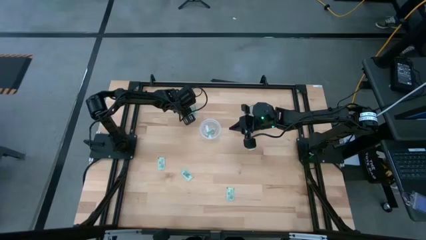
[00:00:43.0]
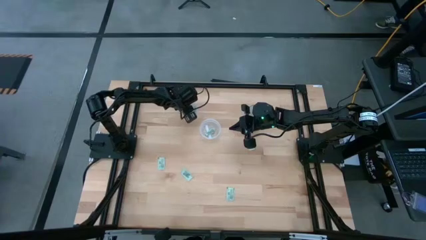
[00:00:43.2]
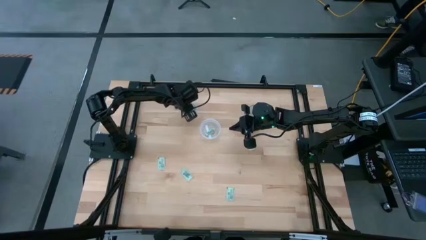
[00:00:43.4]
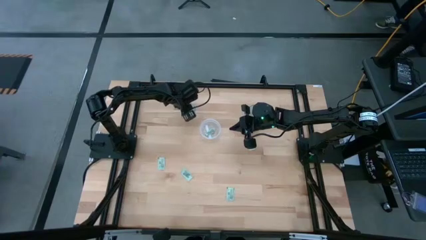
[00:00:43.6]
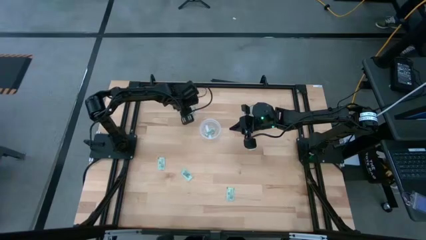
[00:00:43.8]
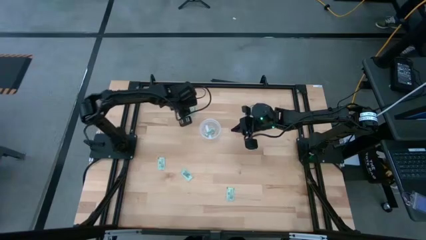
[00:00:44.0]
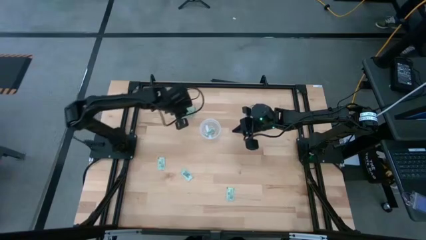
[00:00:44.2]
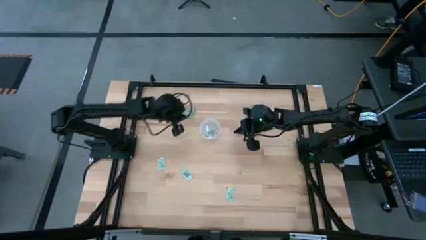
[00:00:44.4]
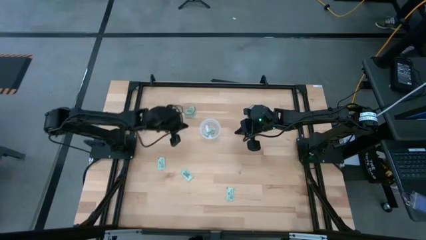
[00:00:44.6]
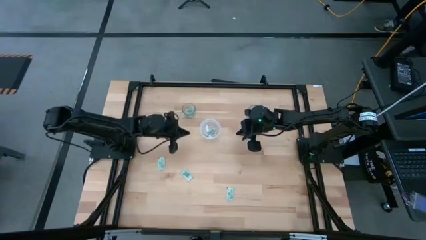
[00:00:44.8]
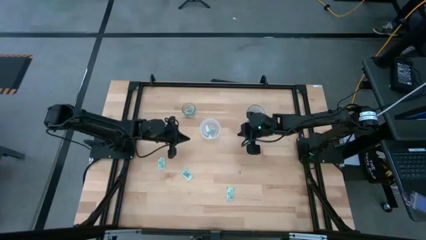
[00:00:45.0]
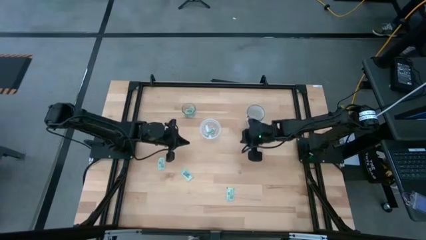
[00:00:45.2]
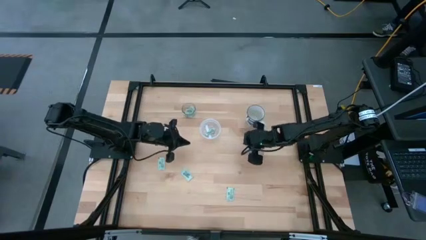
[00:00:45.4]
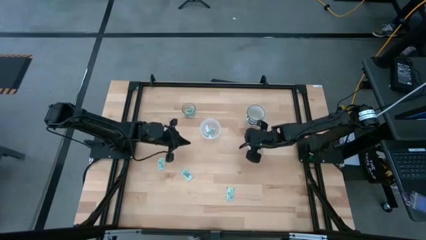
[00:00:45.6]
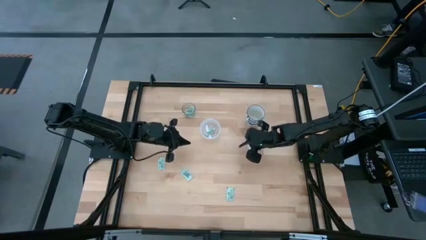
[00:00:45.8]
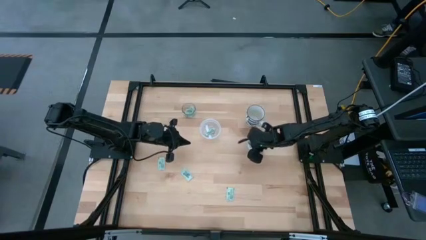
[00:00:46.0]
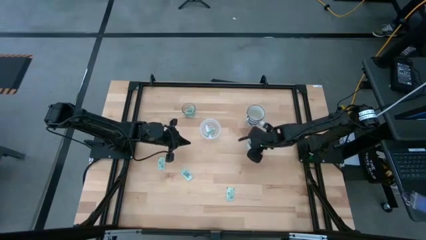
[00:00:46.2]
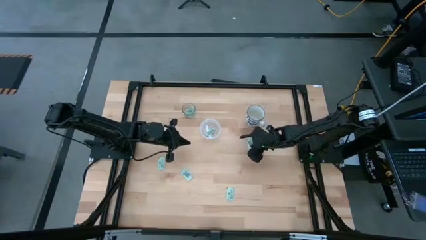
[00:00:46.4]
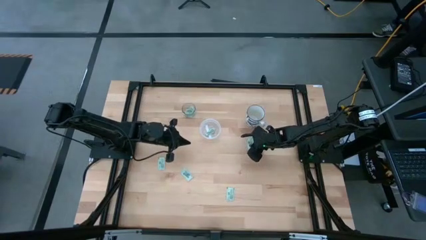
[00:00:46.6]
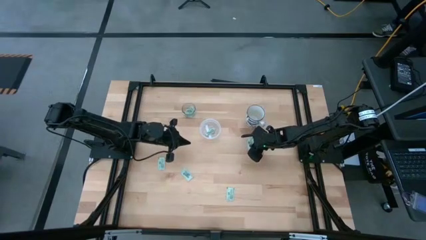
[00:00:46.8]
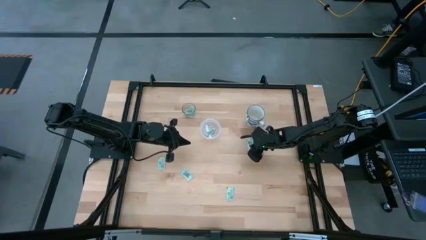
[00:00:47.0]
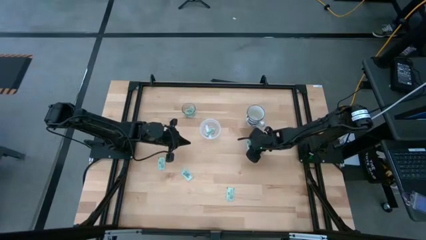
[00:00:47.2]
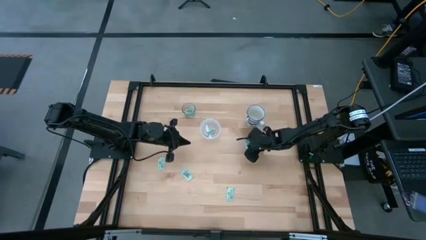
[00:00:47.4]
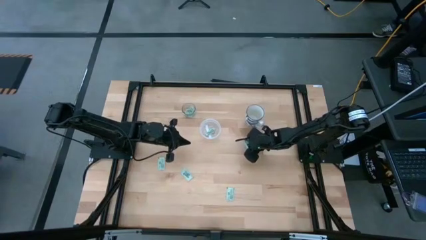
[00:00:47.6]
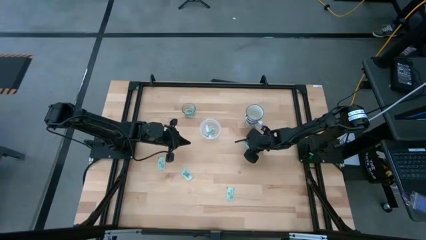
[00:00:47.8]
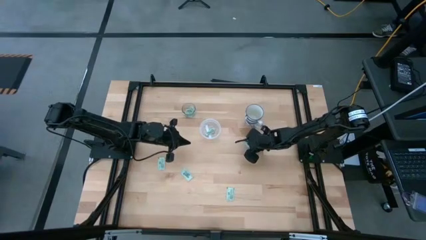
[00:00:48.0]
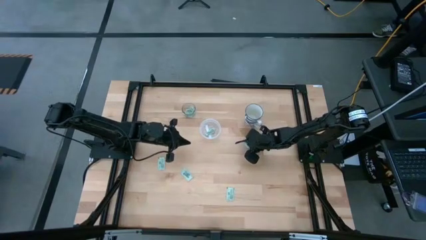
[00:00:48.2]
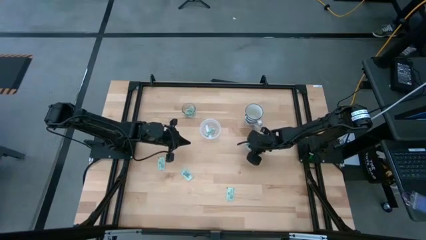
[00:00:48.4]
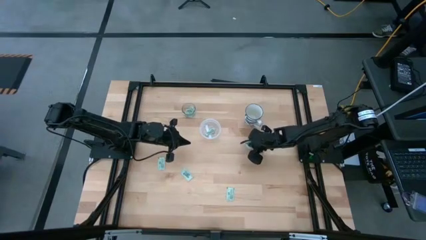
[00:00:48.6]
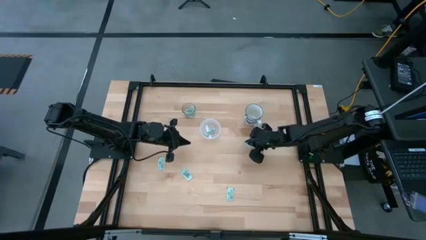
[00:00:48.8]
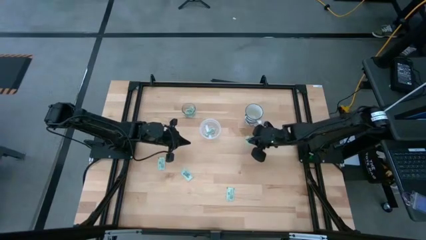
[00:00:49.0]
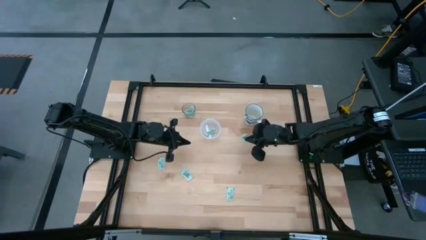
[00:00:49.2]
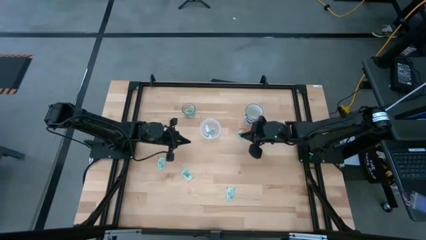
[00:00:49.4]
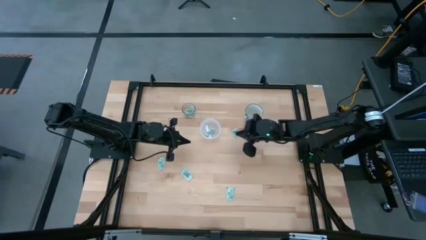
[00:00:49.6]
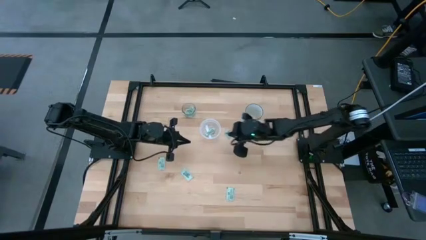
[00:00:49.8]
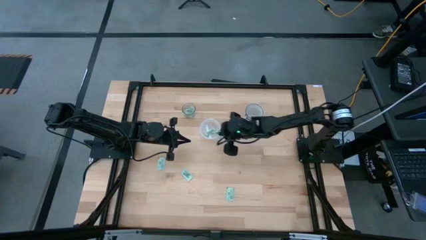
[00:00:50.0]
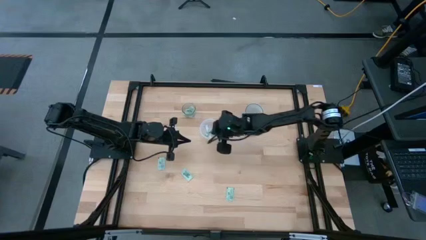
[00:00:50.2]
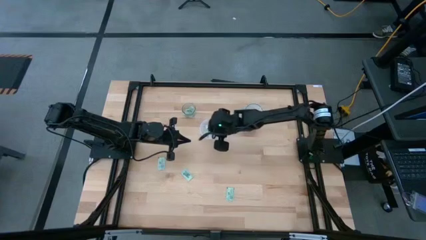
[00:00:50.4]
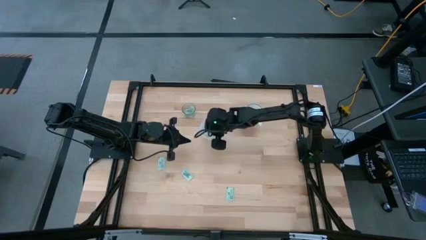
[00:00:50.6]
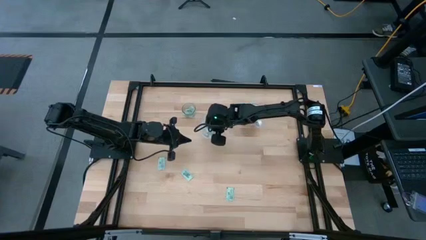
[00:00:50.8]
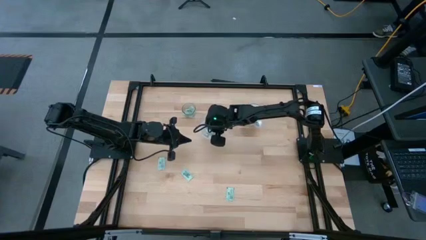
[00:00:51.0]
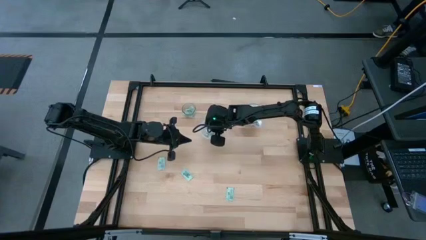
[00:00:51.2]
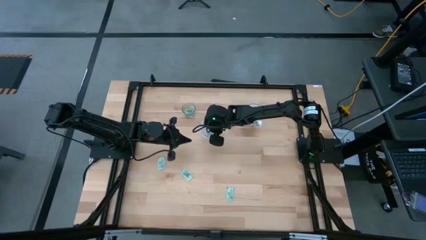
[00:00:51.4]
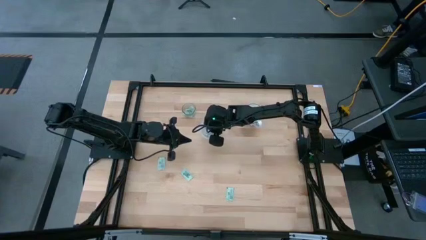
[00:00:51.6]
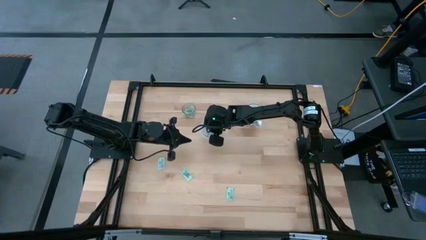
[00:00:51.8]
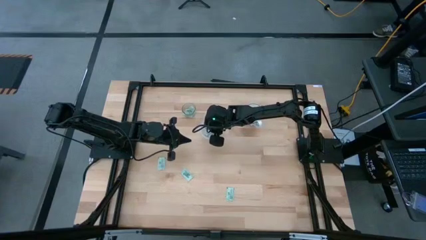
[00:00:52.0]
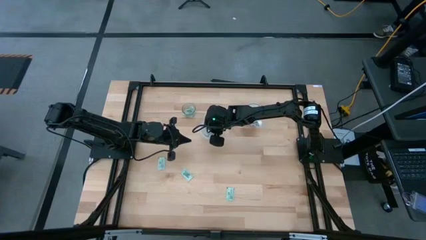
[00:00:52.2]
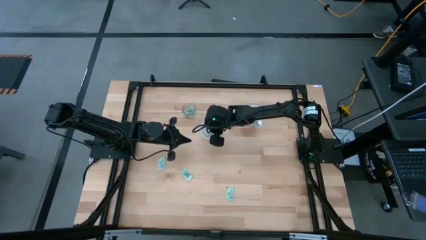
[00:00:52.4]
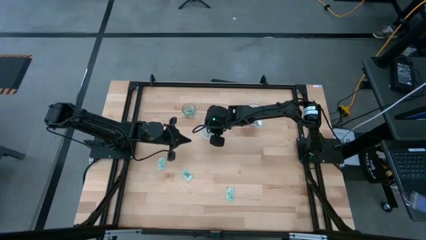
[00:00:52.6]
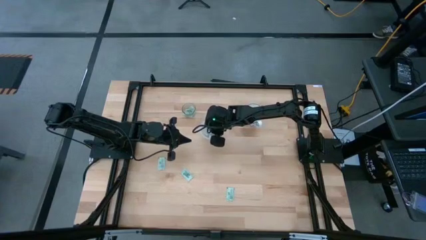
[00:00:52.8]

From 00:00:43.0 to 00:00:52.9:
Task: Pick and place Stevia / Truvia into bins
Put the stevia packet into the transparent container
